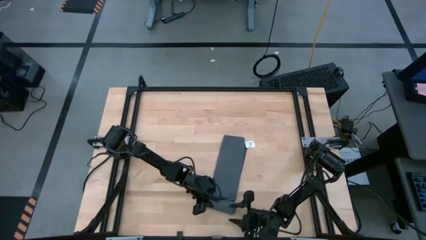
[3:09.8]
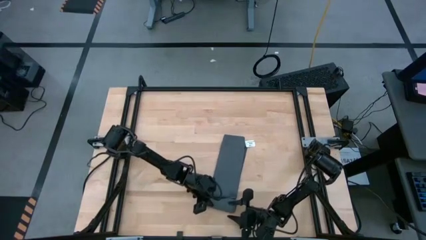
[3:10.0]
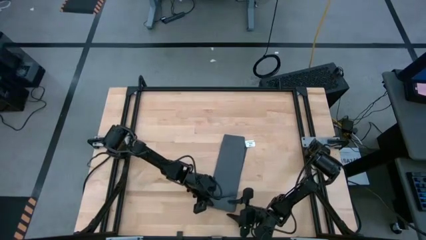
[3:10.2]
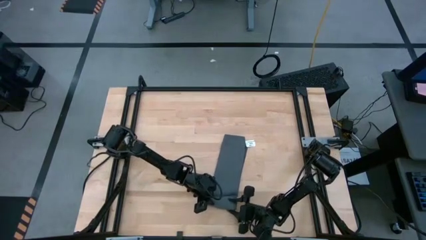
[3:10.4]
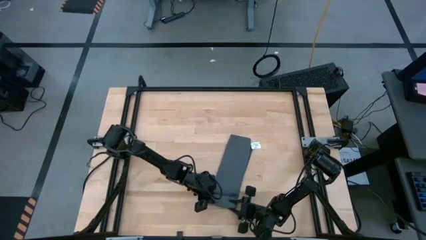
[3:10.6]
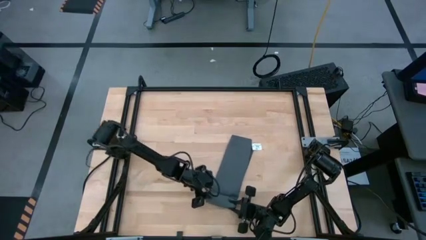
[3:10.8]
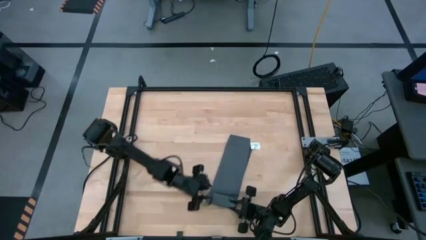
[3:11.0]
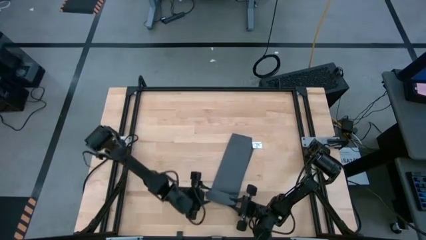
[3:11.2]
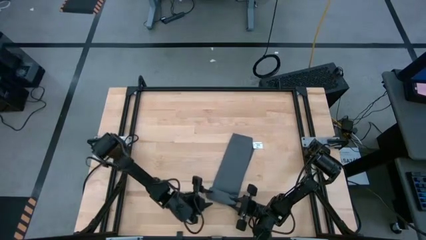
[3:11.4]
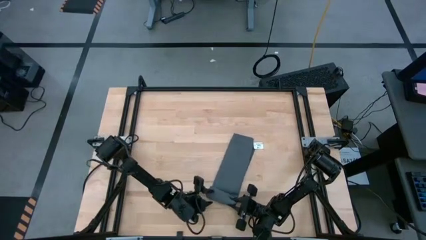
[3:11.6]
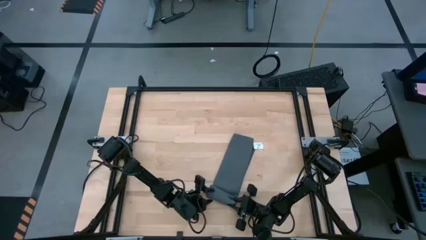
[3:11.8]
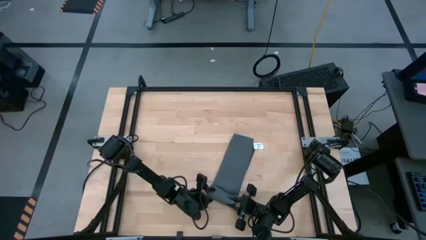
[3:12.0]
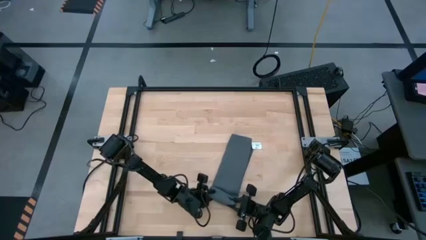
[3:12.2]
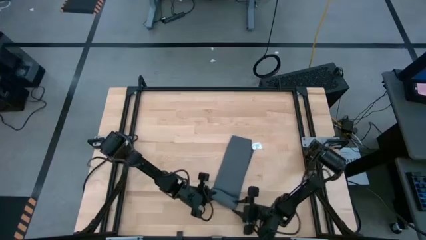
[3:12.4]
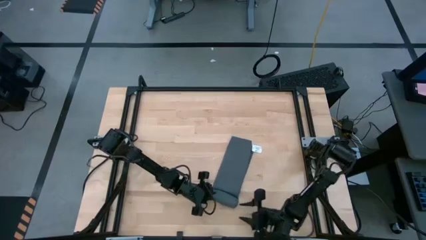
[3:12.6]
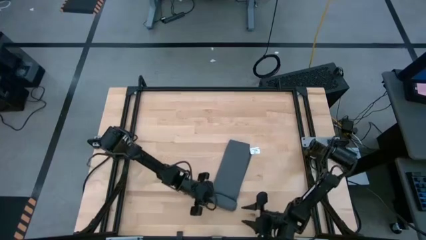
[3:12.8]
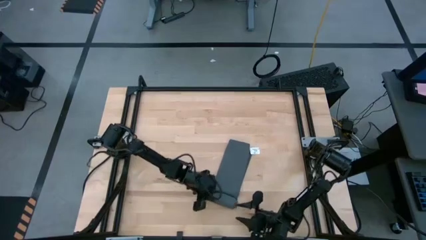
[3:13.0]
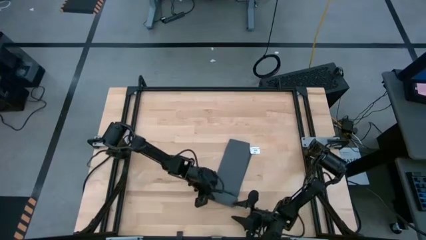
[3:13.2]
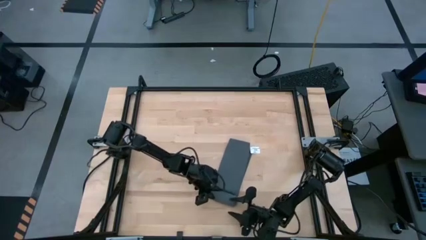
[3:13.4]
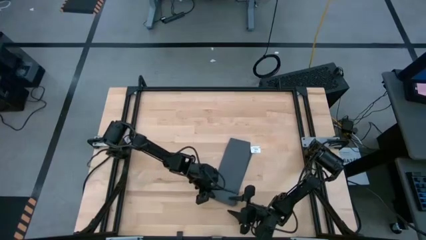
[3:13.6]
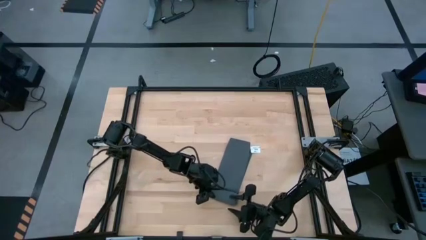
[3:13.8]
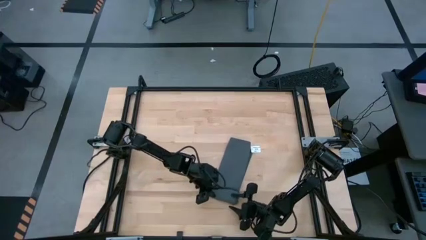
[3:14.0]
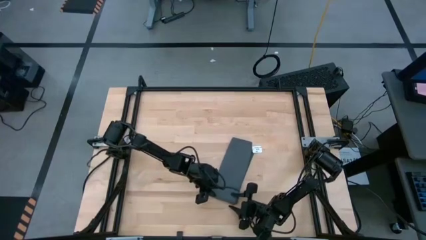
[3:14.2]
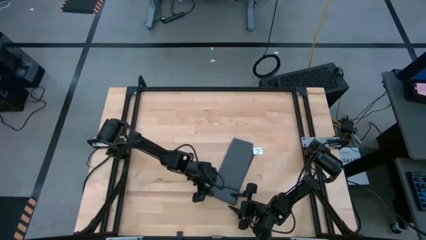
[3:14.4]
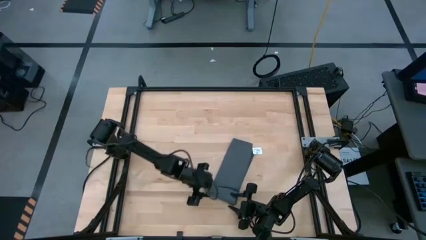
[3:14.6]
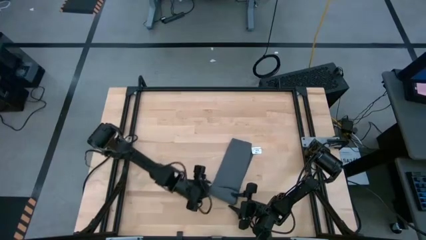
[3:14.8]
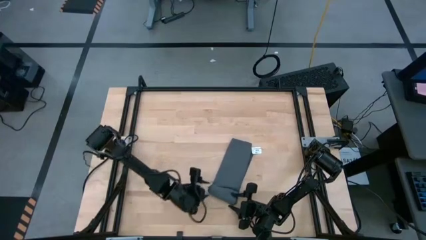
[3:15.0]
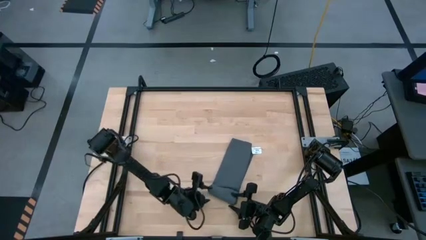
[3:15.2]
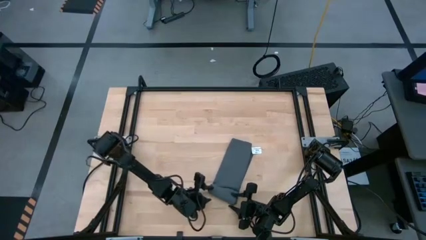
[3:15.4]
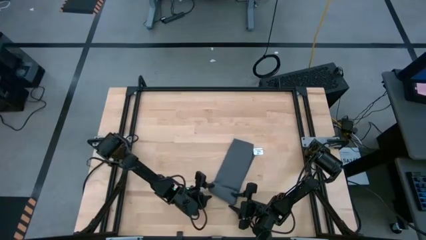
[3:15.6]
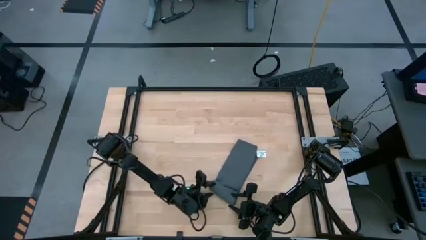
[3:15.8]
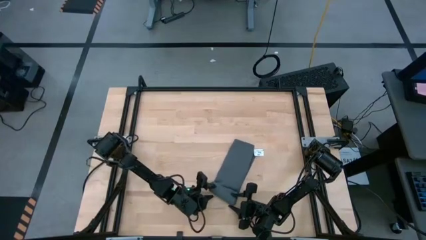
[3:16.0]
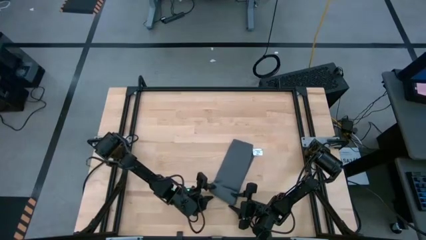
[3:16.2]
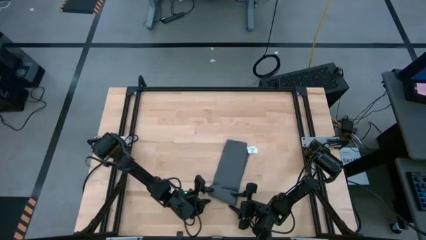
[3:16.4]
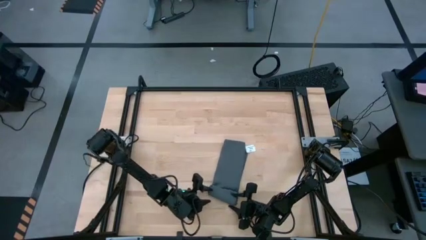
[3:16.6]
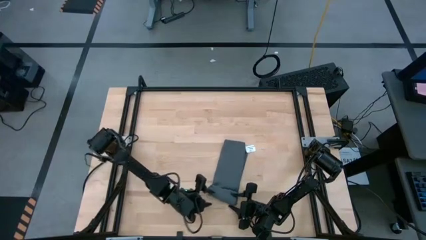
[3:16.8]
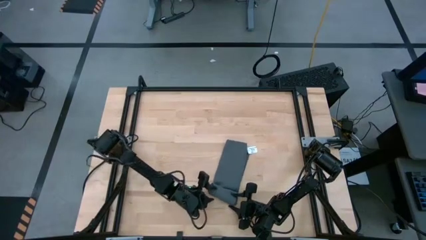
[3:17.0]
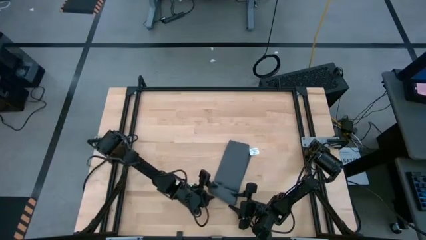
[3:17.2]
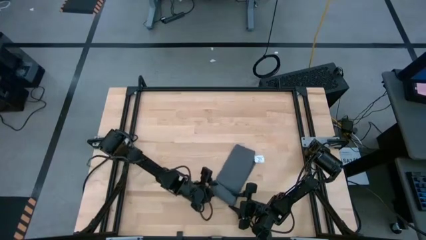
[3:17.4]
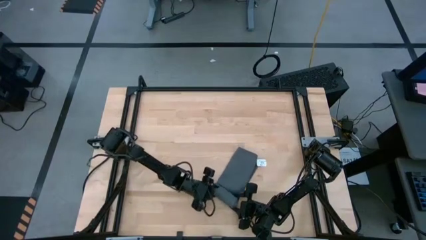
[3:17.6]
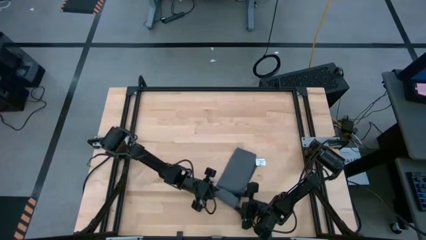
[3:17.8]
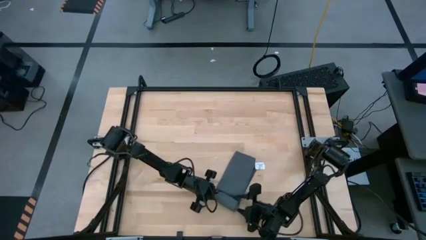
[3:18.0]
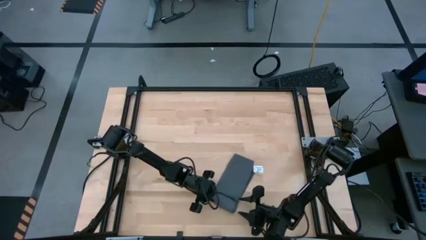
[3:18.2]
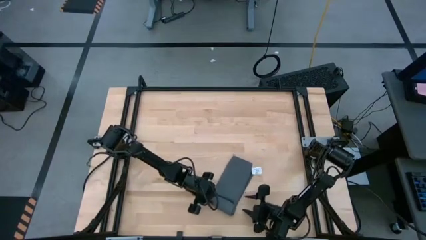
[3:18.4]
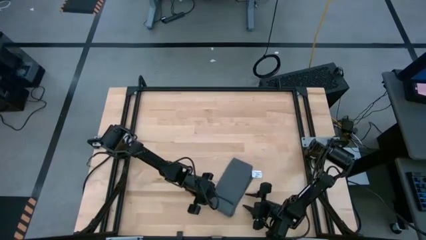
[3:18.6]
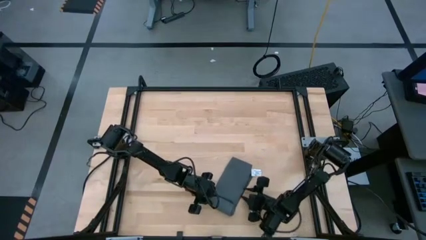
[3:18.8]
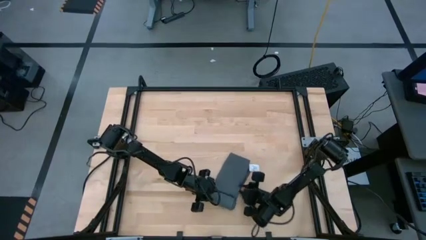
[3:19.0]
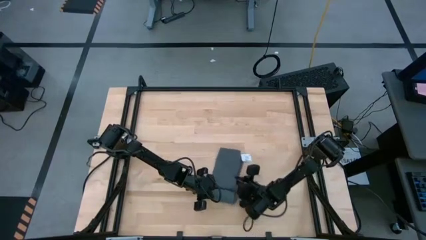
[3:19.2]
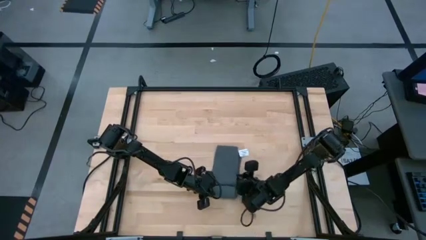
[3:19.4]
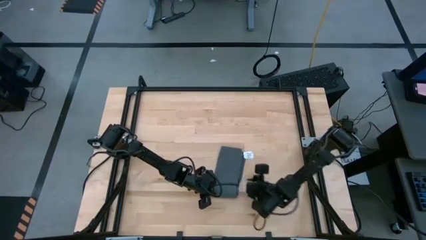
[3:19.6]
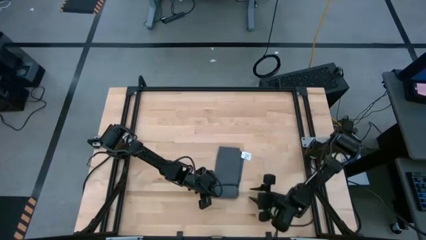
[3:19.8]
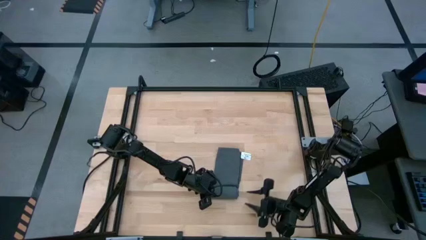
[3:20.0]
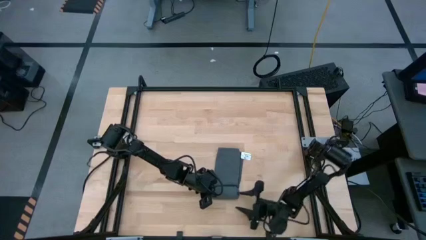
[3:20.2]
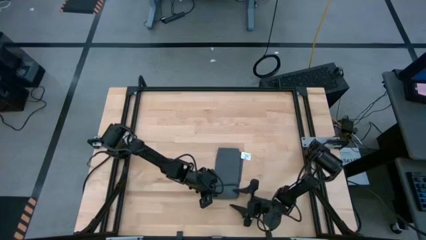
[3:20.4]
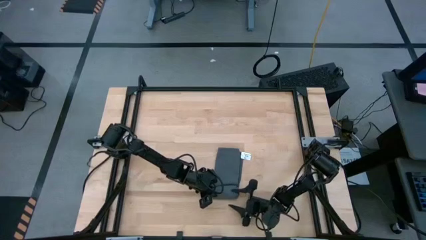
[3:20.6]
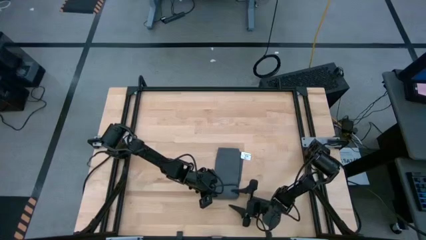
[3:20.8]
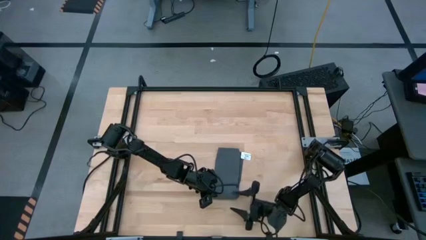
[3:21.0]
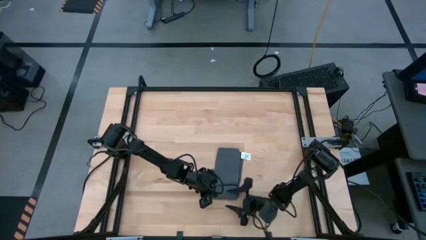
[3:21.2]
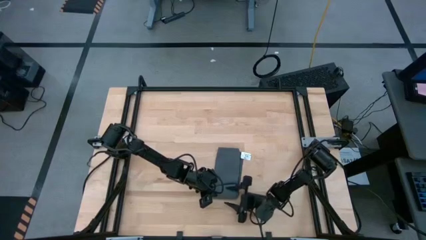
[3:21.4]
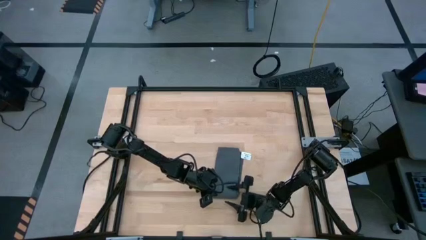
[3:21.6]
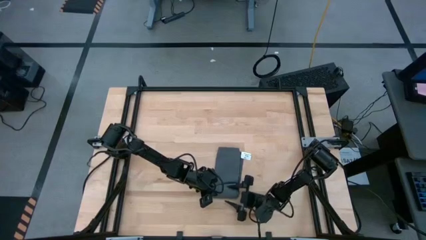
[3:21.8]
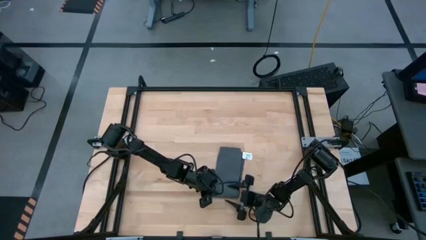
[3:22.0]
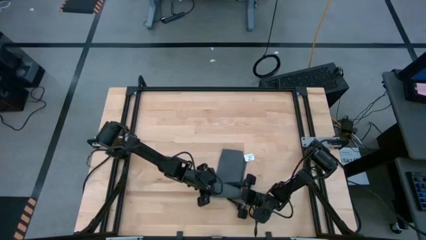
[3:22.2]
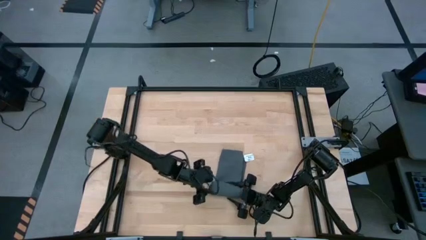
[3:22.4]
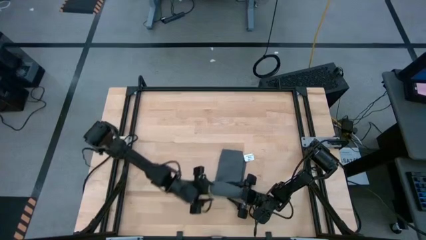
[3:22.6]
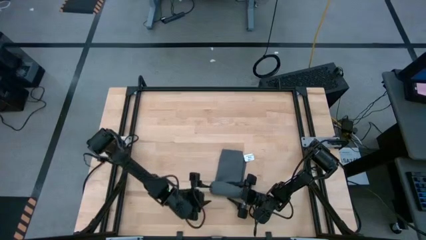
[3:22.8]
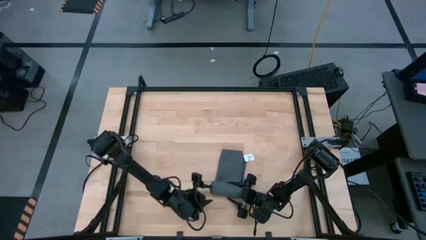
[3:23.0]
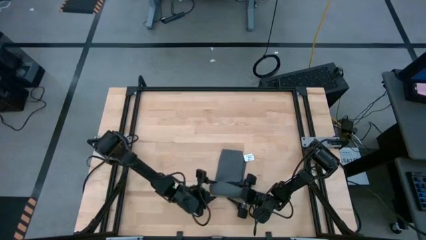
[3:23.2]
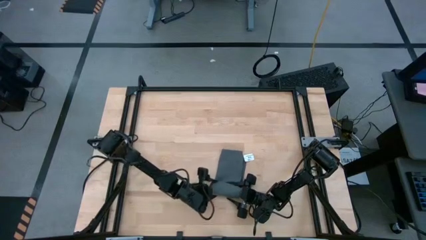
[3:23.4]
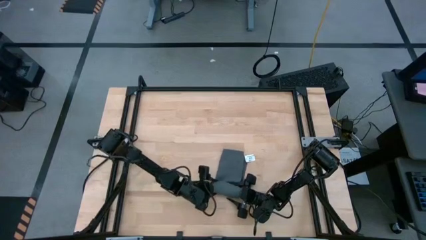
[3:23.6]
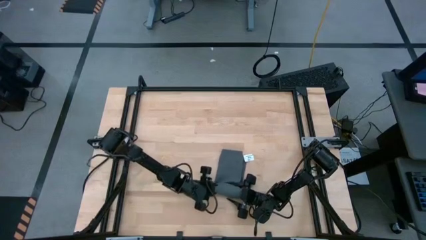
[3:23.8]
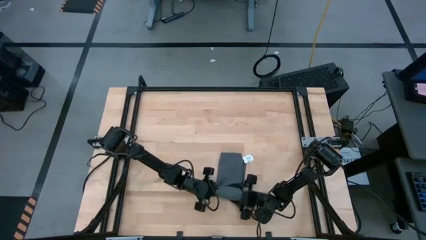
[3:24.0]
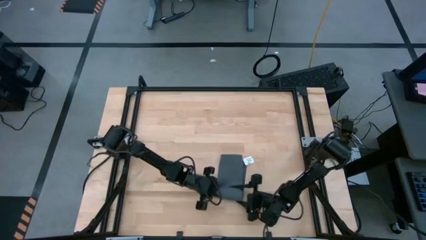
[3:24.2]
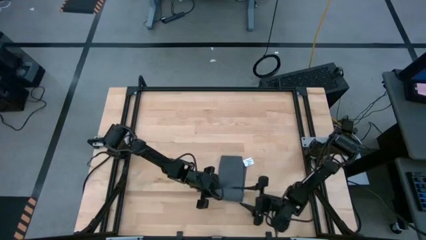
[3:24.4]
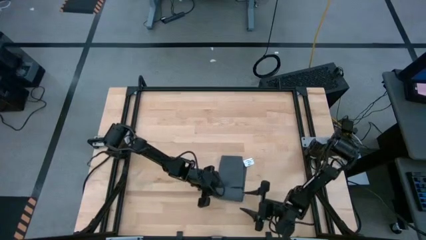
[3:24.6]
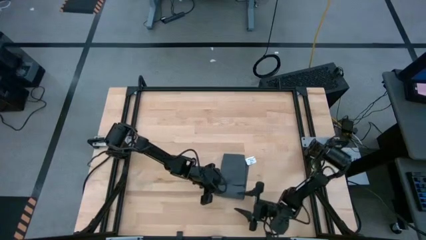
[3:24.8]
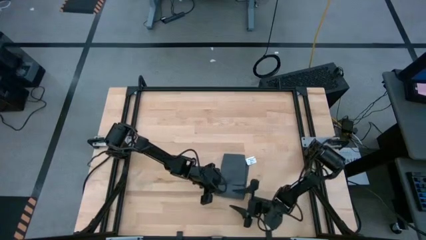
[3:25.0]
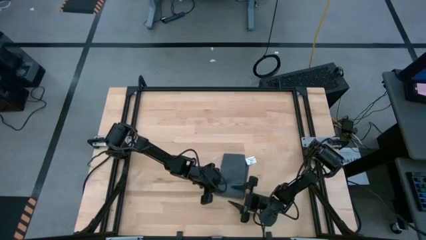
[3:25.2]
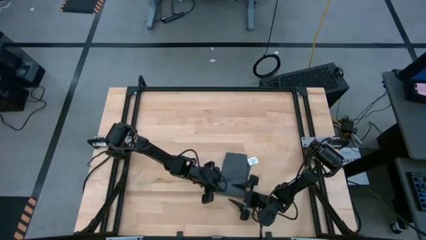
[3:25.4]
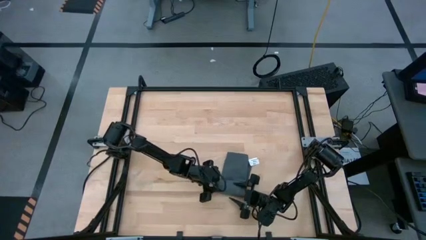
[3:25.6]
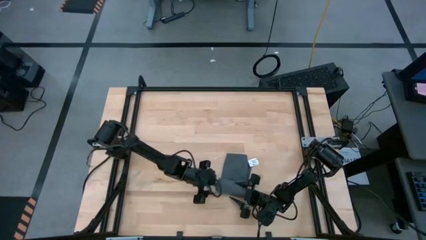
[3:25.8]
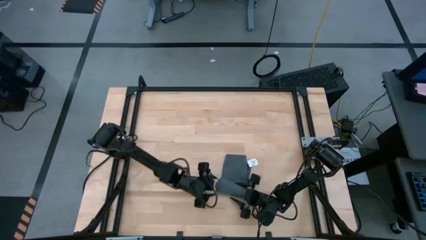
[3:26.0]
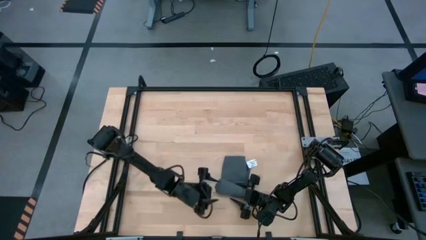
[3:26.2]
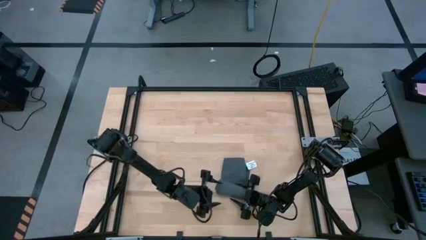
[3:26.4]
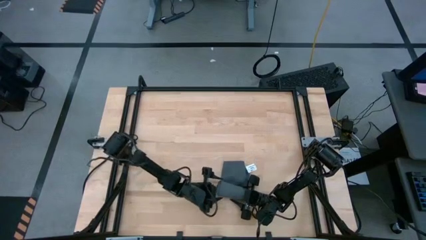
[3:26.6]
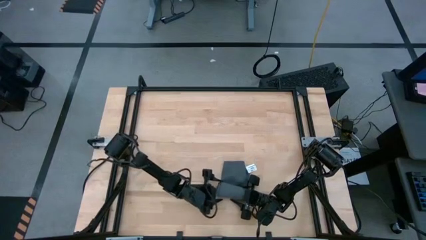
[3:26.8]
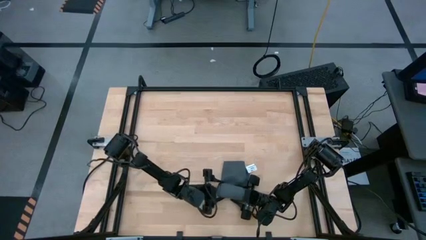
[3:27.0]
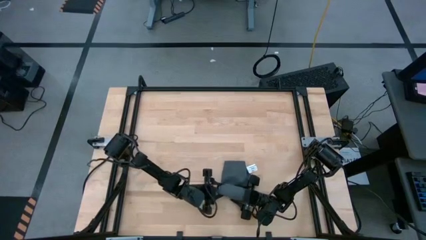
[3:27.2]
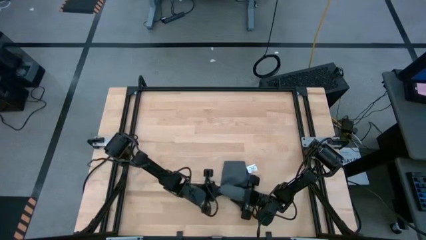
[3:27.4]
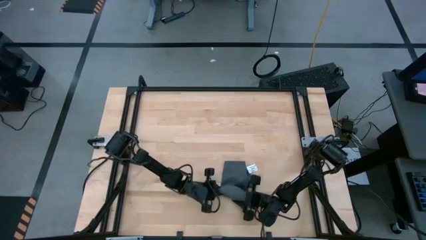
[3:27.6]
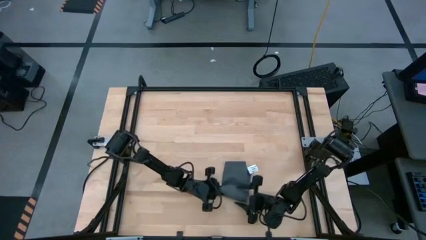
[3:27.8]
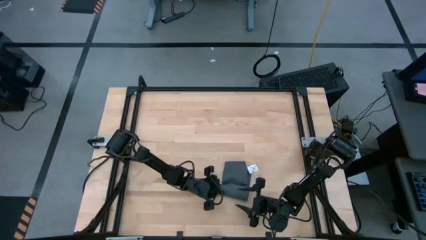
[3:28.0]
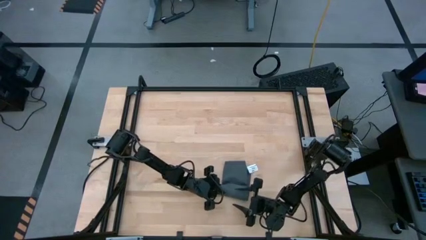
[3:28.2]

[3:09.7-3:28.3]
Task: Roll towel into tight, uniform cylinder
Roll the towel
